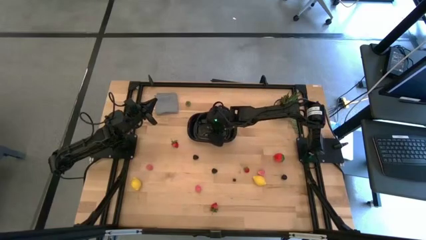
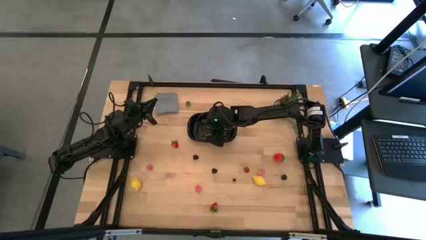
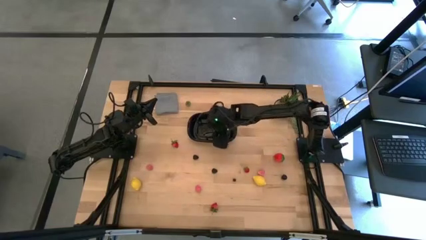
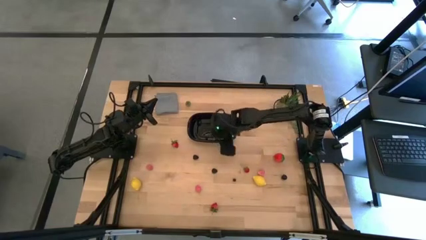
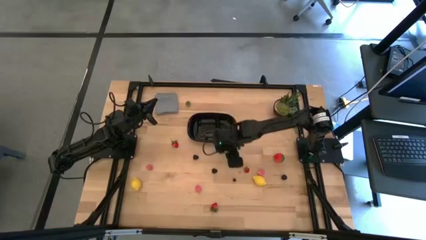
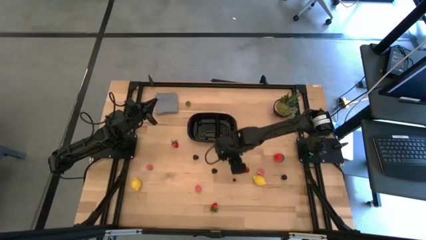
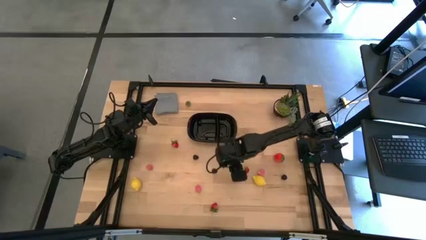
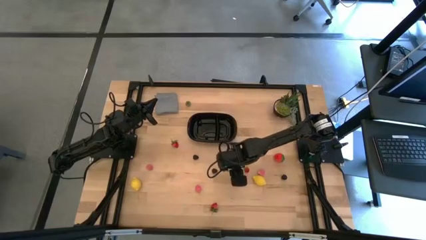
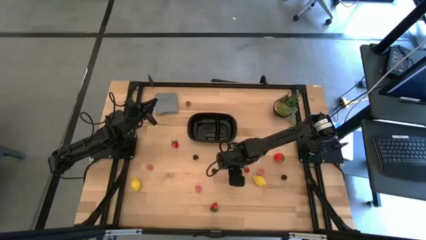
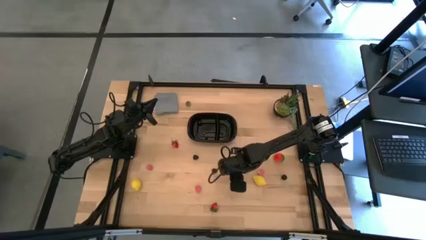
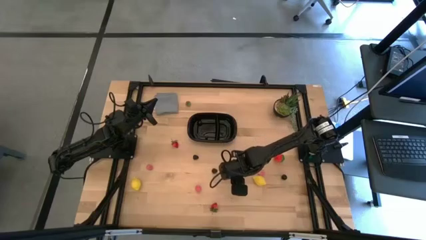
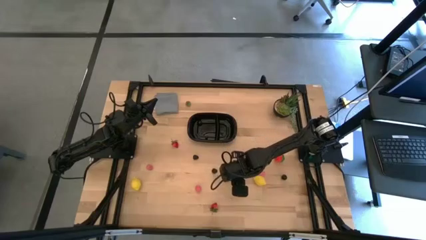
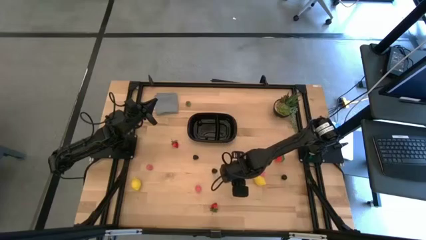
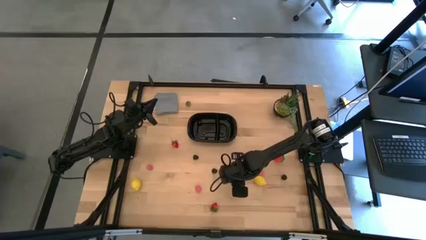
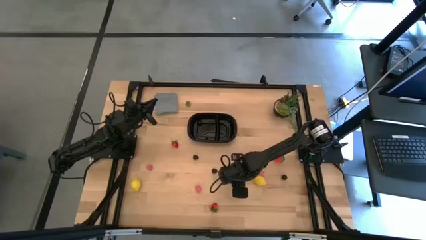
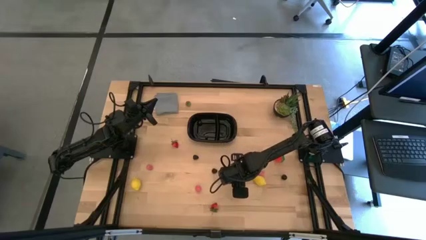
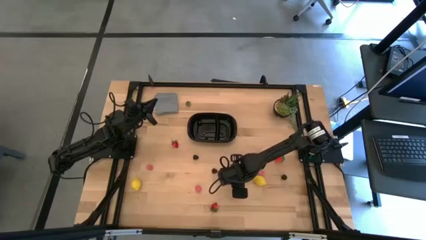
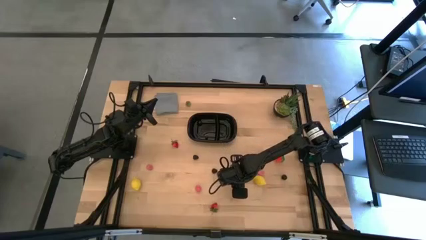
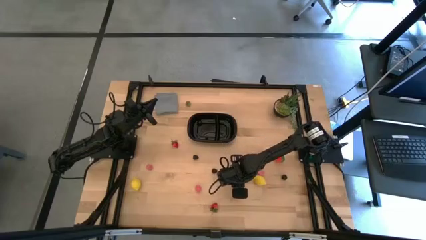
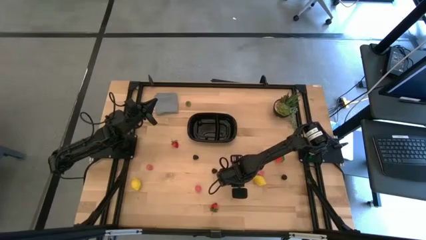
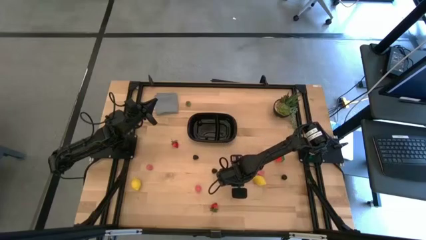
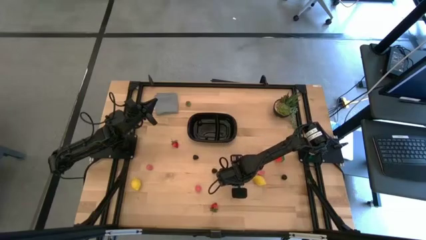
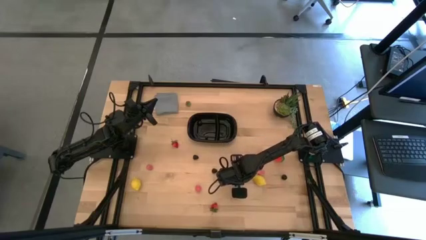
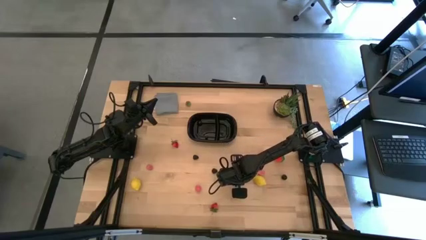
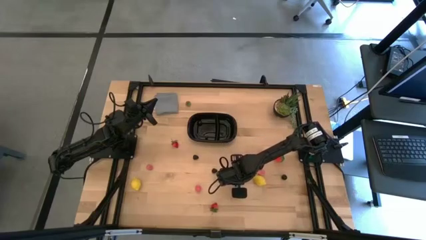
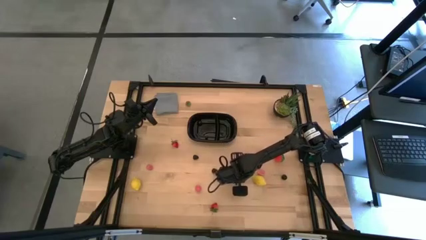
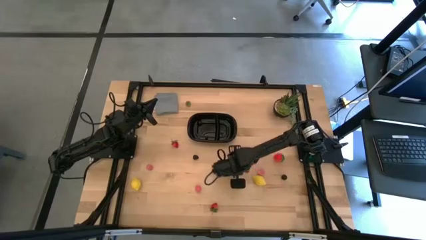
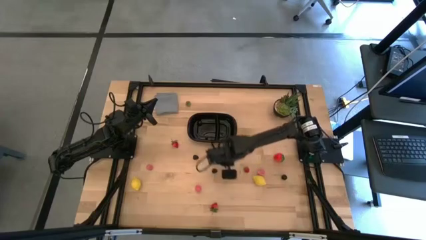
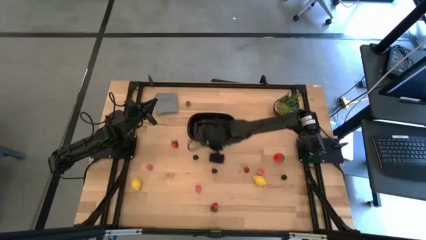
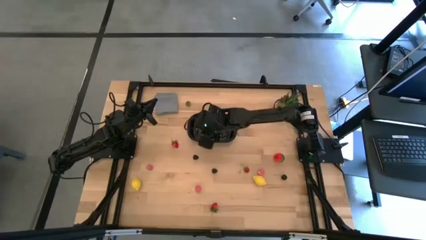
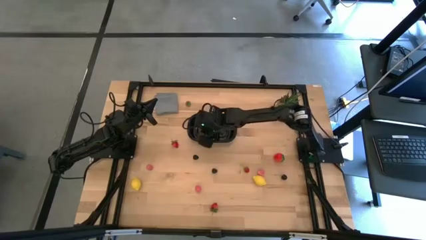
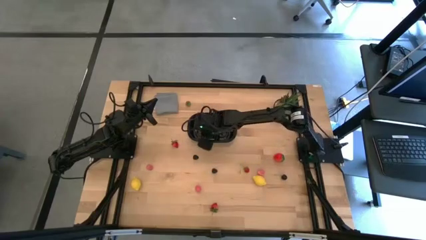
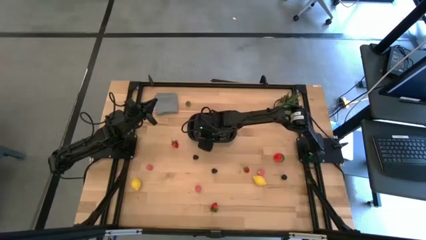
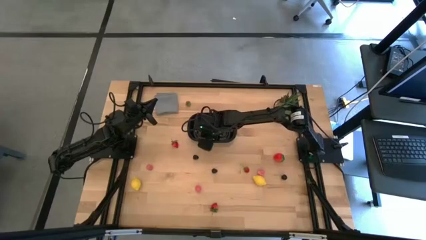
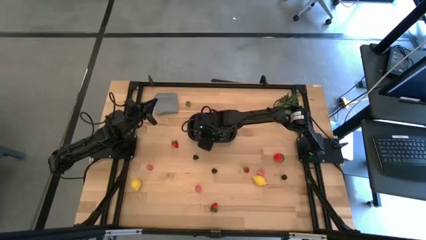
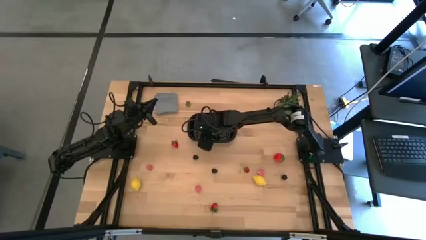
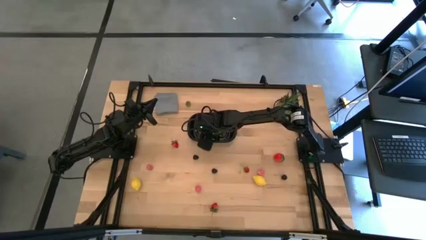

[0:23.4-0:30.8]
Task: Pick and placing Produce into tupperware
Put the blueberry into the black container

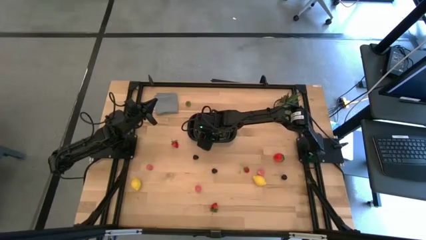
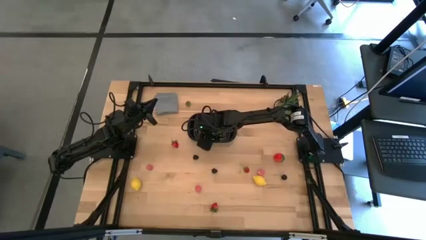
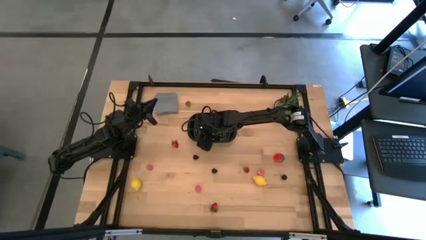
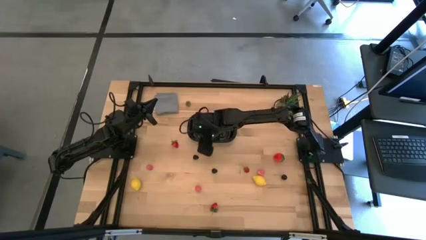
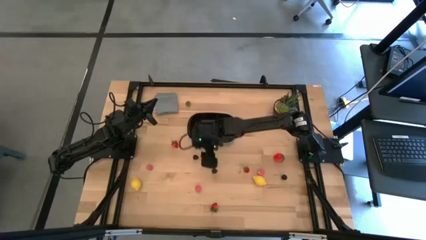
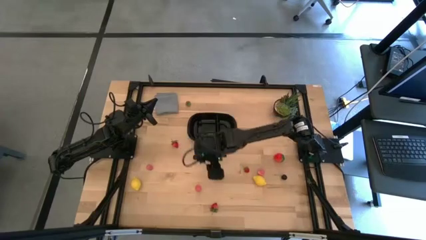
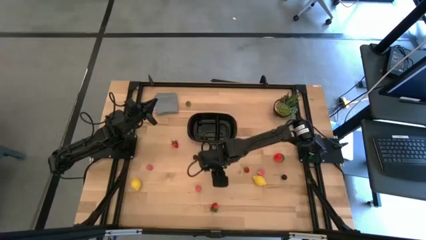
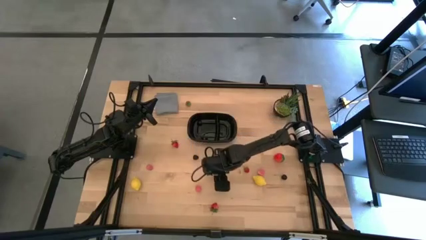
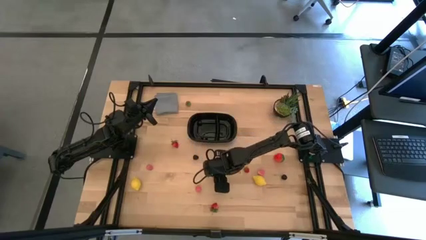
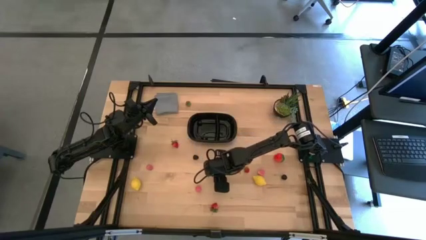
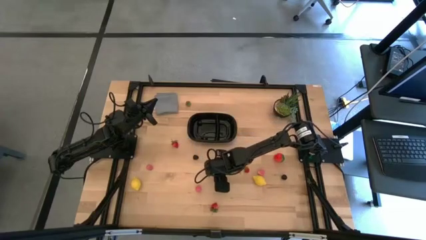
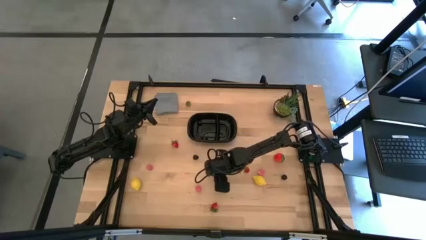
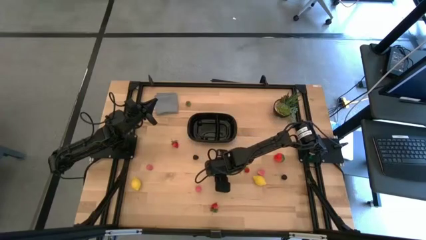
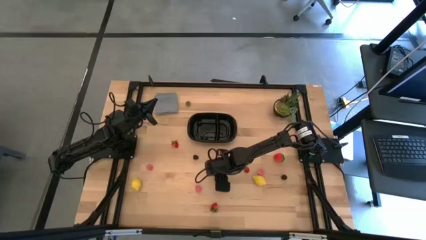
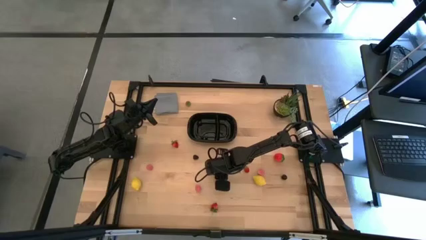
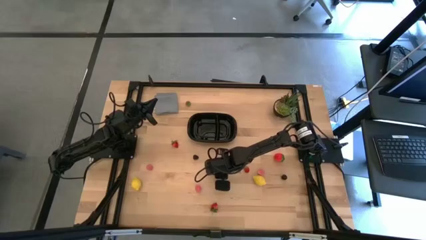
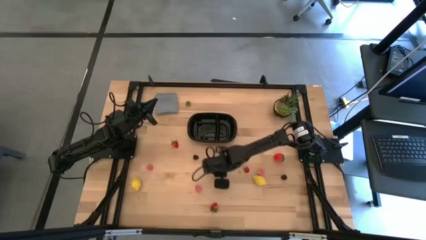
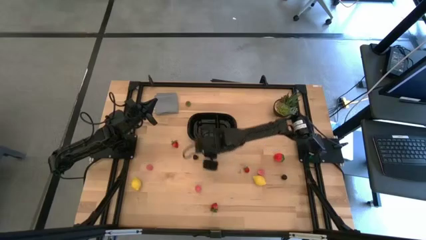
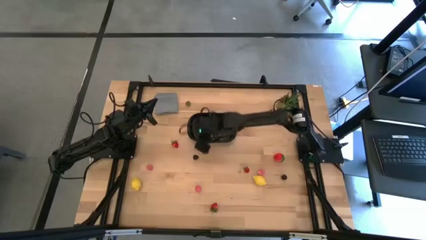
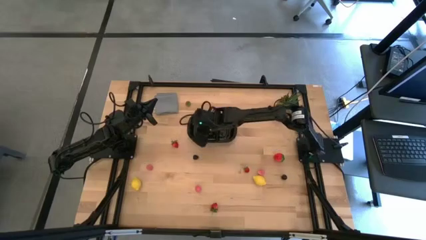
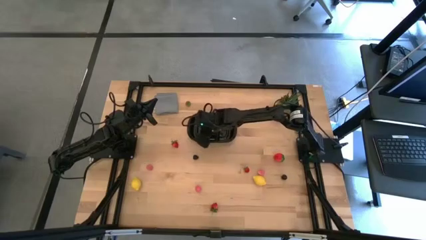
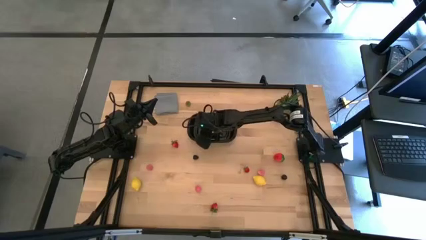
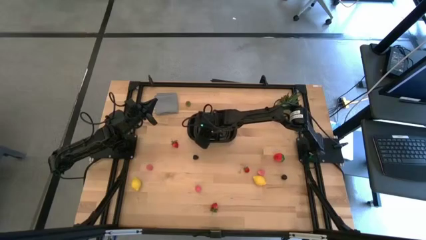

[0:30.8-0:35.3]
Put the left blackberry into the black container

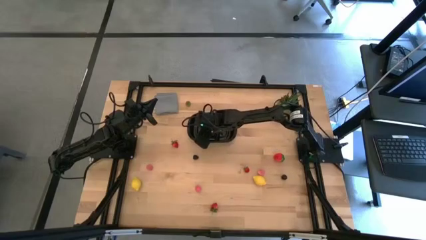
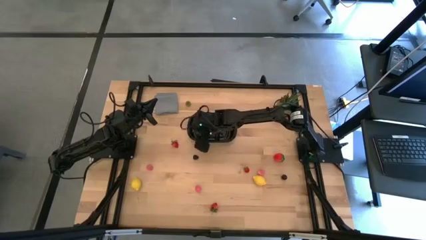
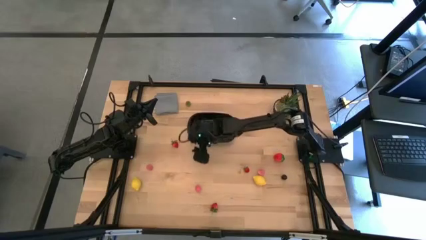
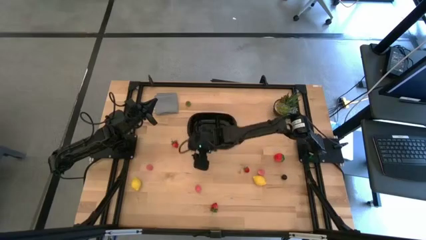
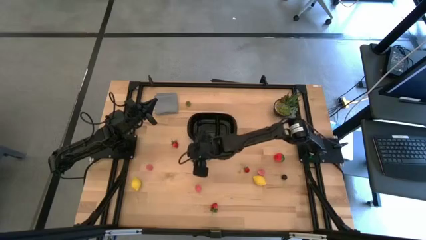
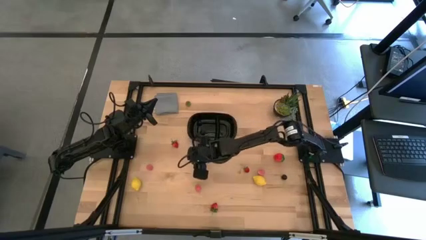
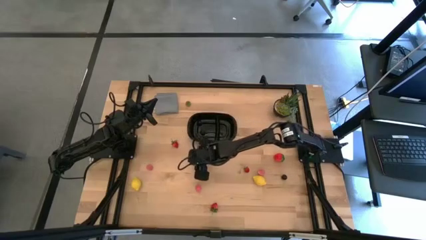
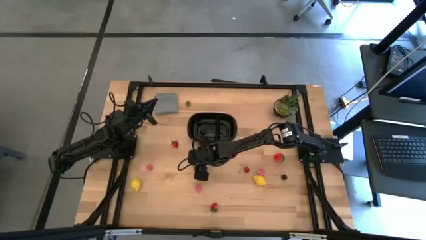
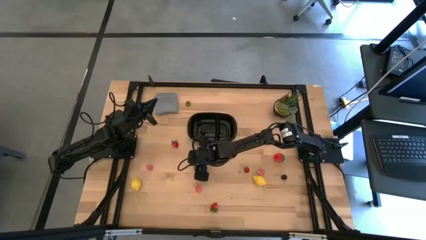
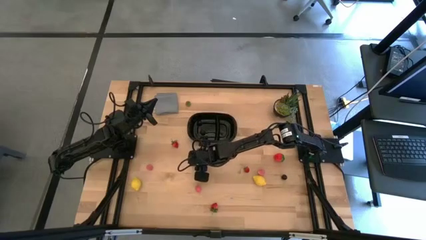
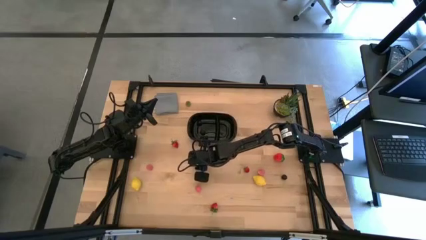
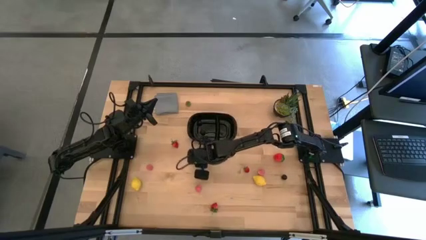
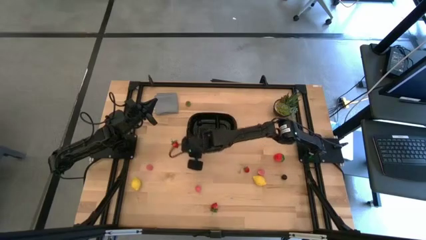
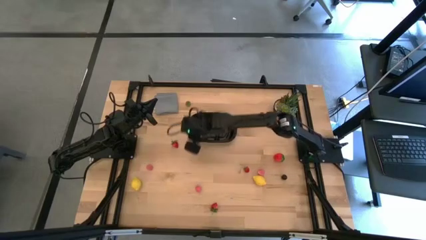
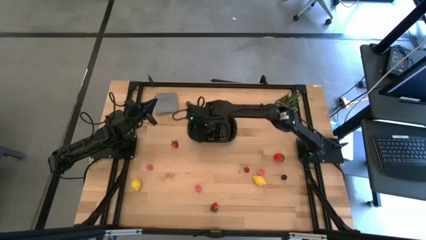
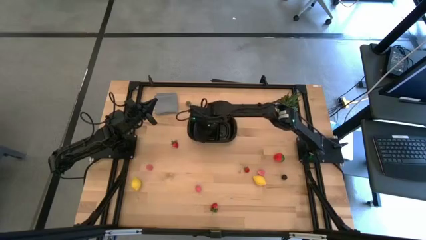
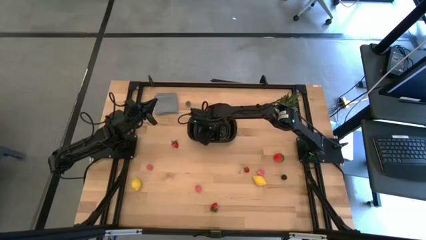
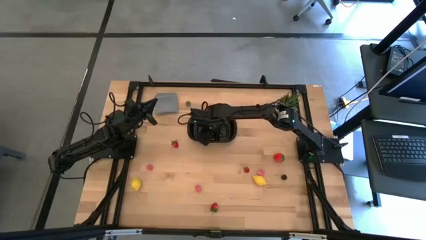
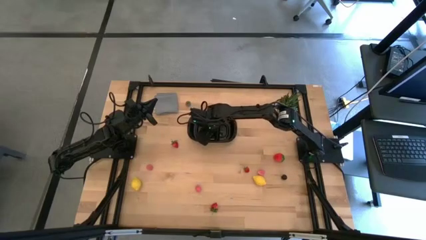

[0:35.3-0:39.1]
Put the blackberry into the black container

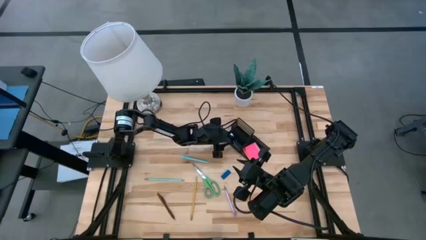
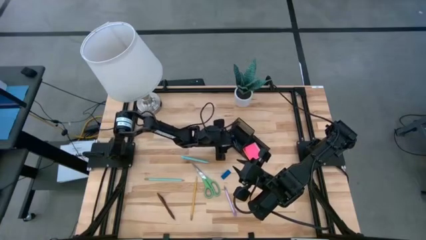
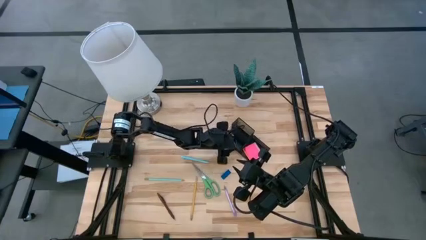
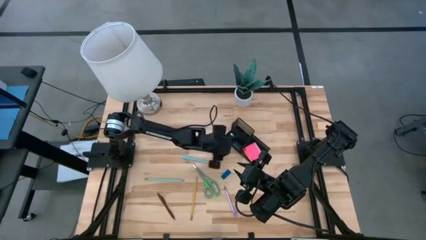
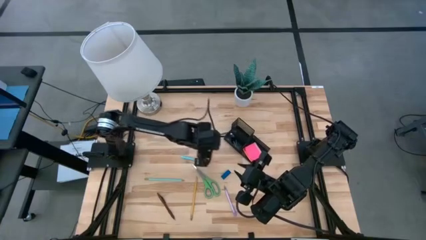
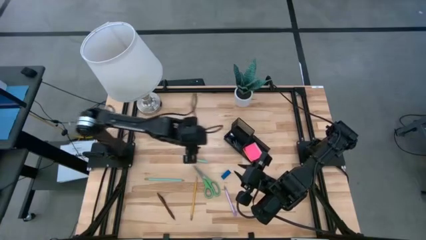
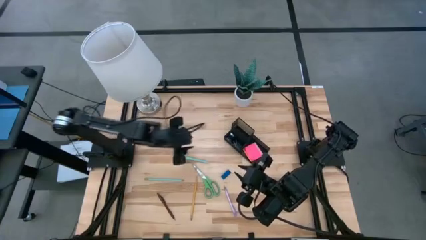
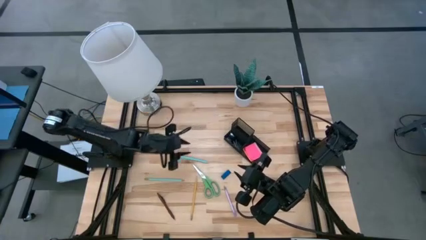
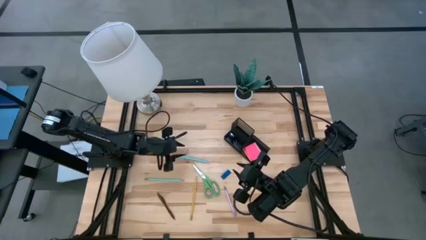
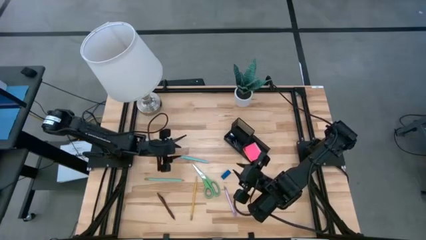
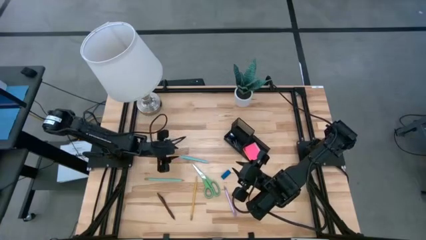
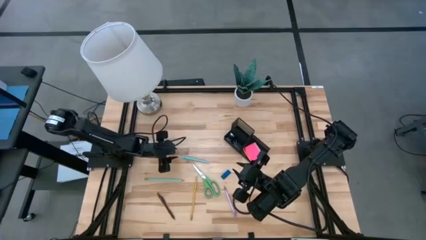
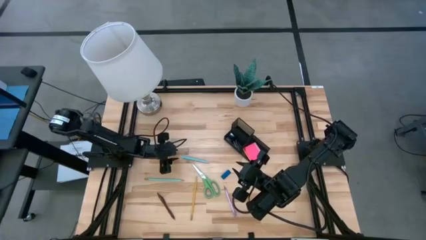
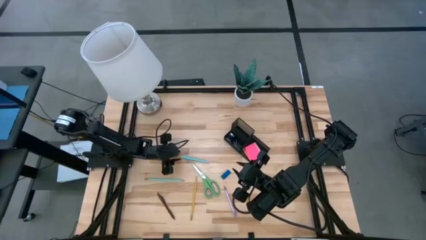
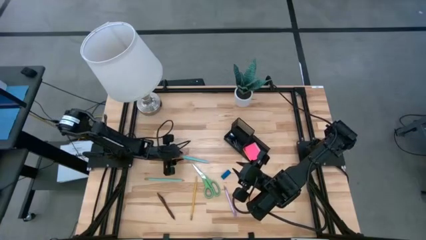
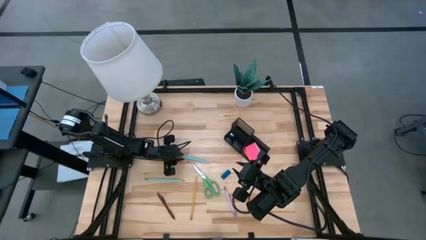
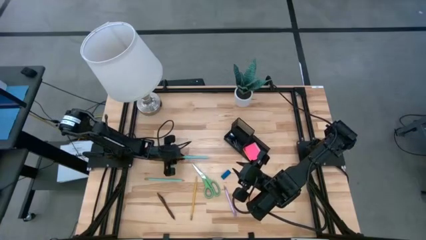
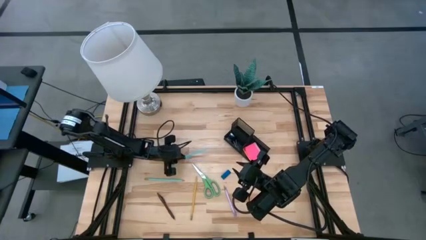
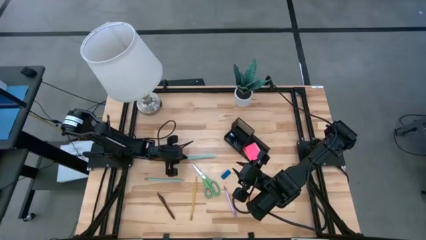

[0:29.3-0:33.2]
Task: Pick and place office supplies into organizer
Put the blue pen into the desk organizer
